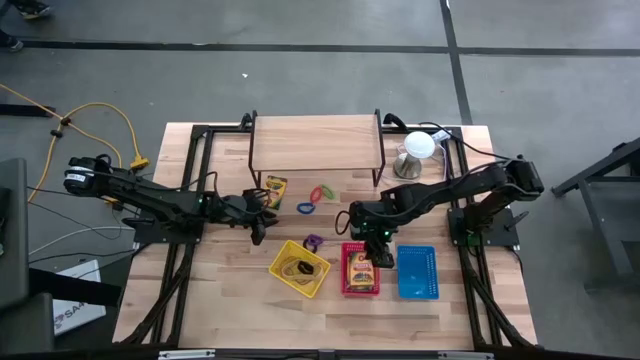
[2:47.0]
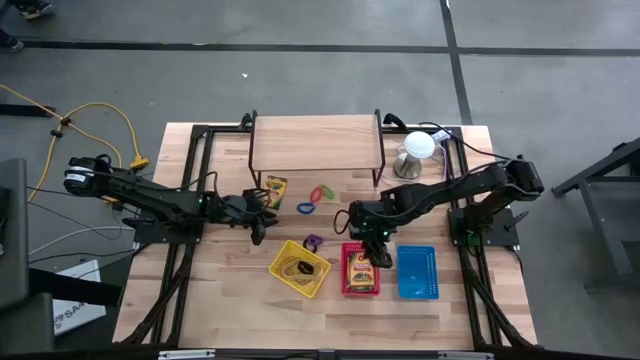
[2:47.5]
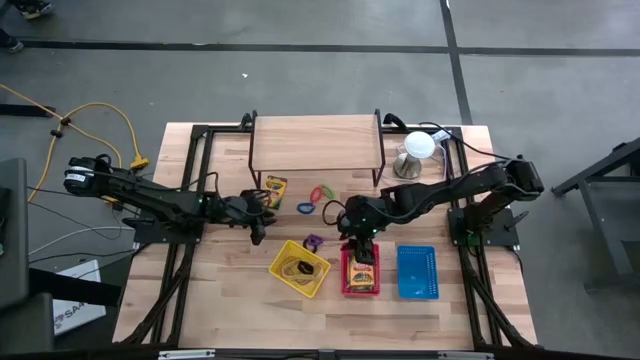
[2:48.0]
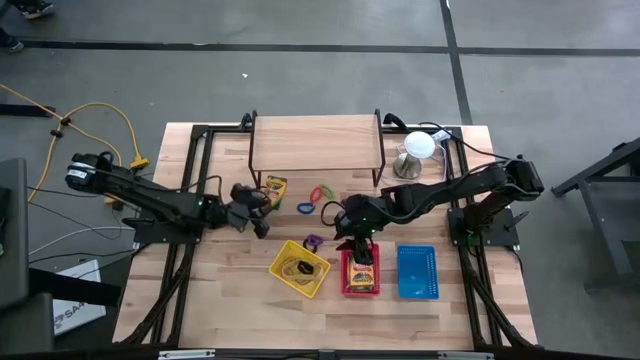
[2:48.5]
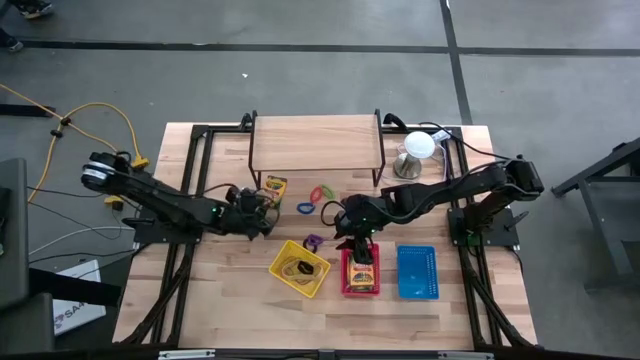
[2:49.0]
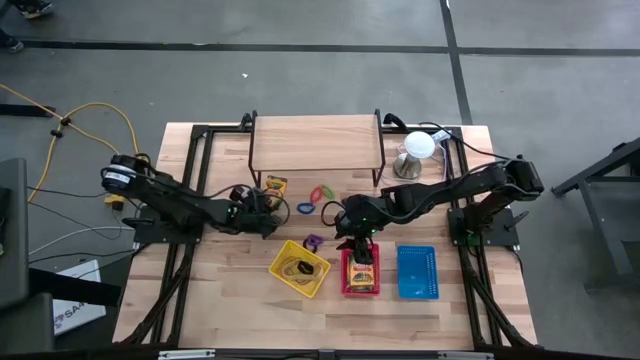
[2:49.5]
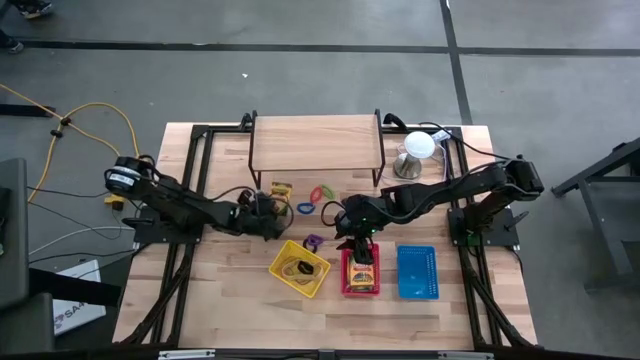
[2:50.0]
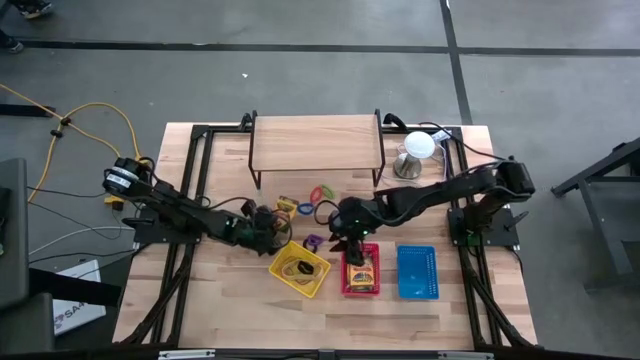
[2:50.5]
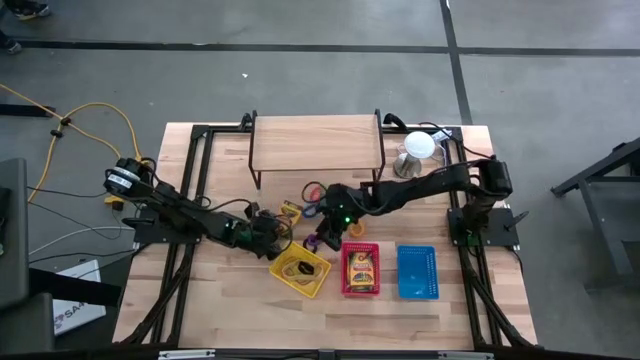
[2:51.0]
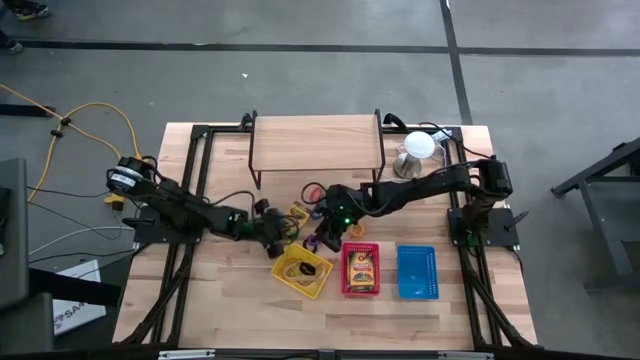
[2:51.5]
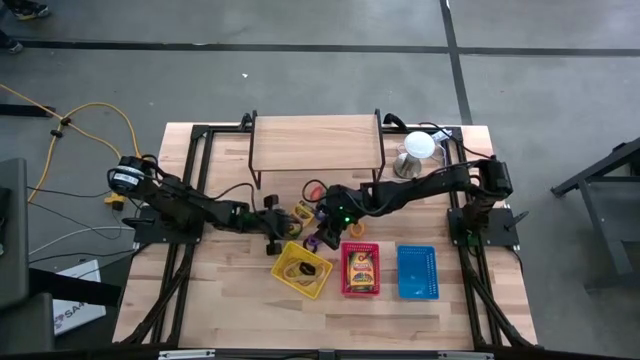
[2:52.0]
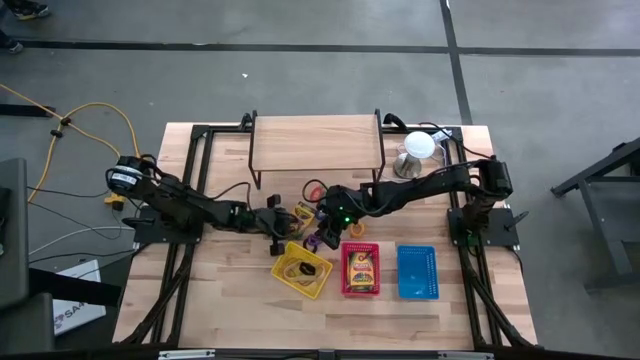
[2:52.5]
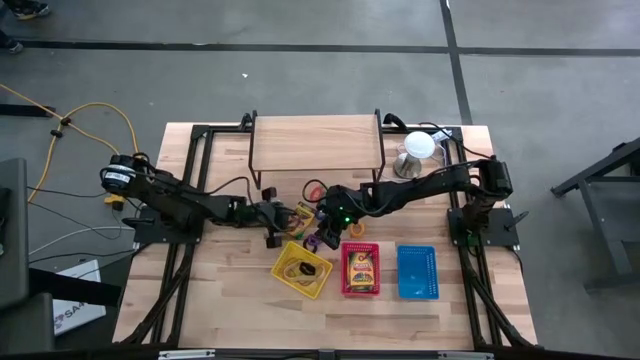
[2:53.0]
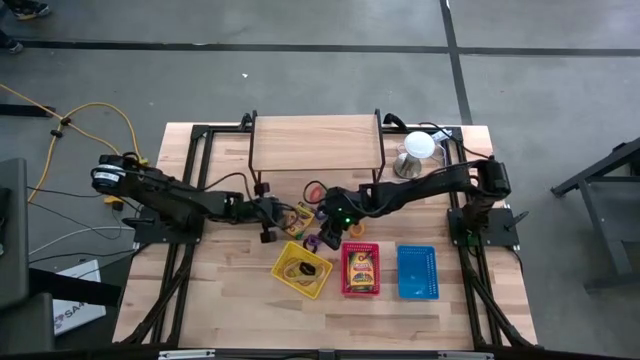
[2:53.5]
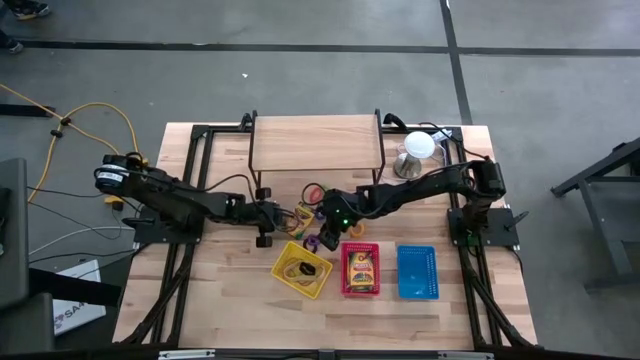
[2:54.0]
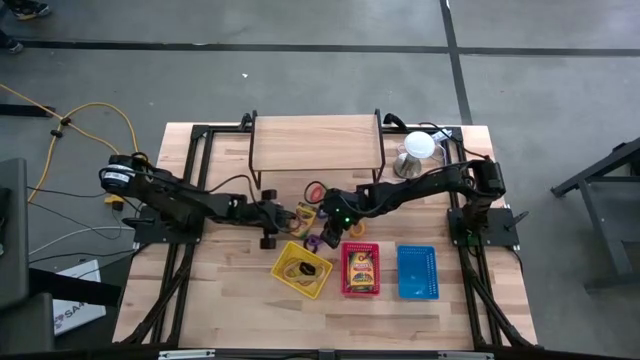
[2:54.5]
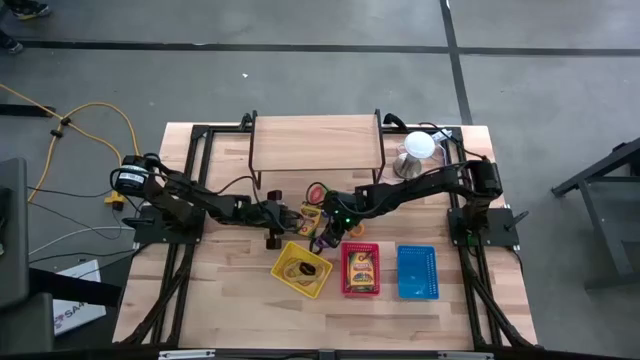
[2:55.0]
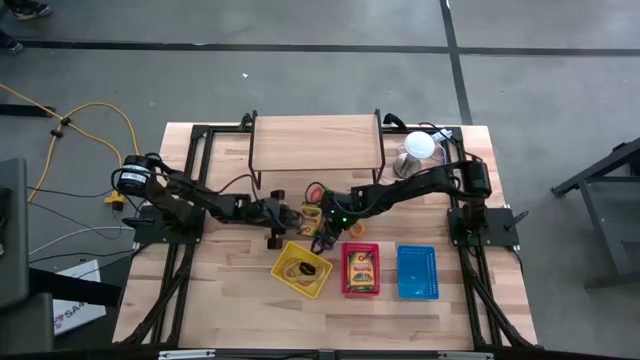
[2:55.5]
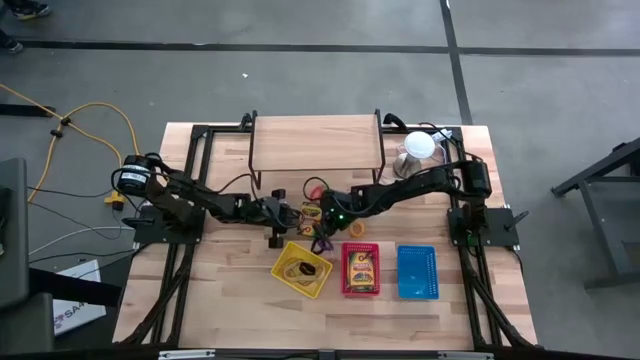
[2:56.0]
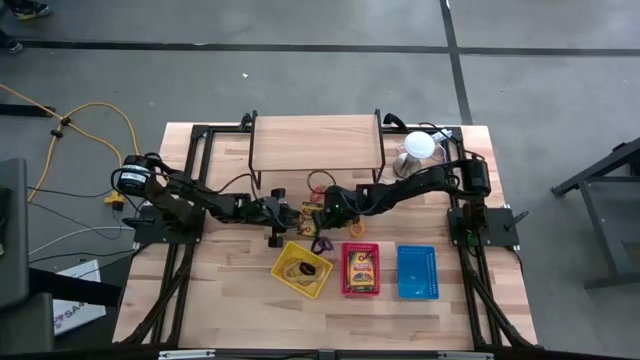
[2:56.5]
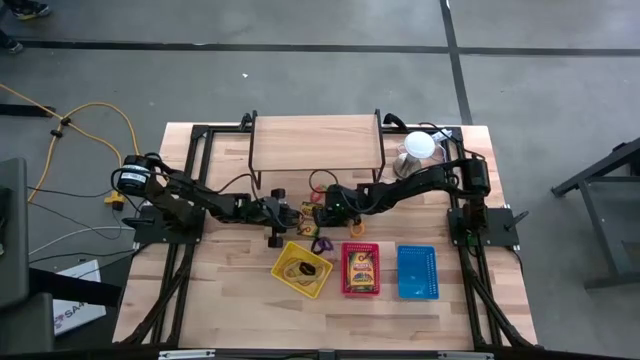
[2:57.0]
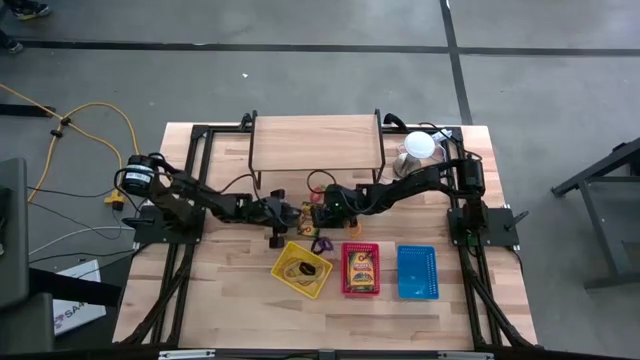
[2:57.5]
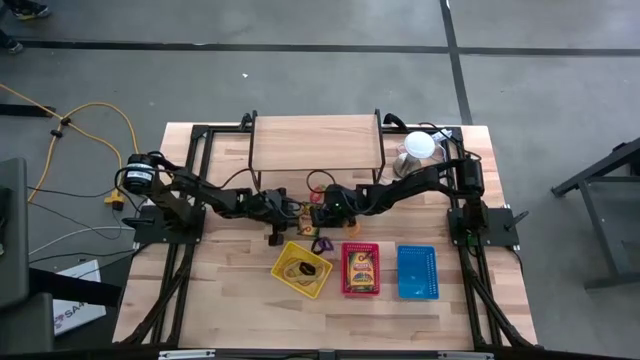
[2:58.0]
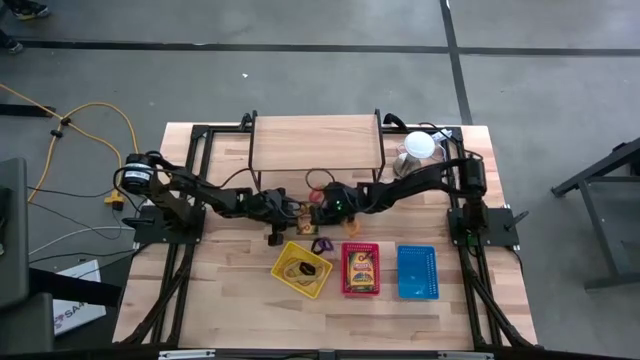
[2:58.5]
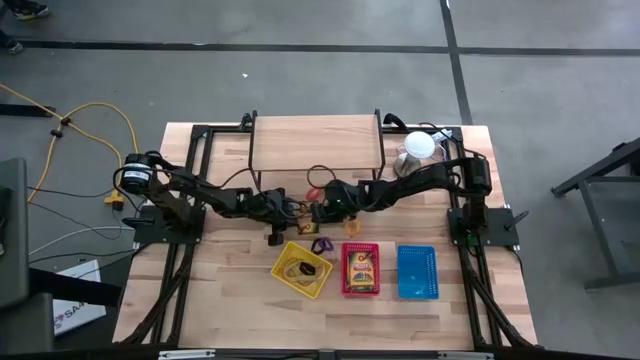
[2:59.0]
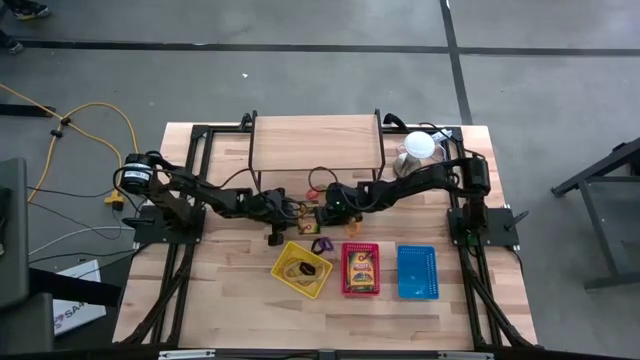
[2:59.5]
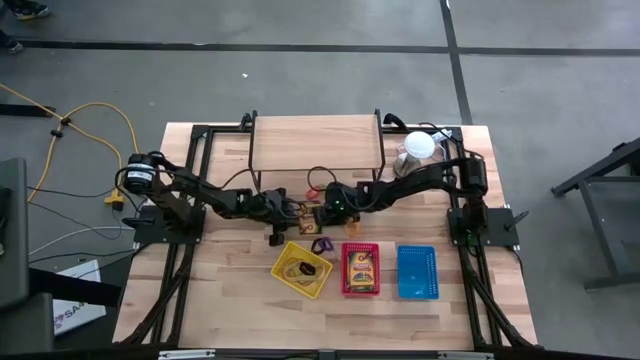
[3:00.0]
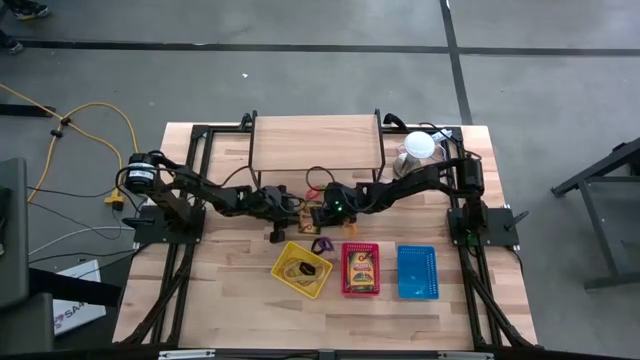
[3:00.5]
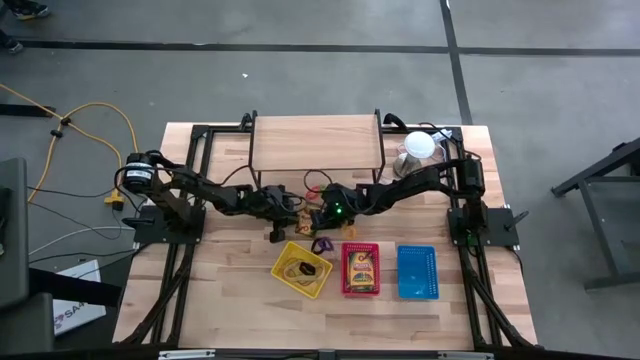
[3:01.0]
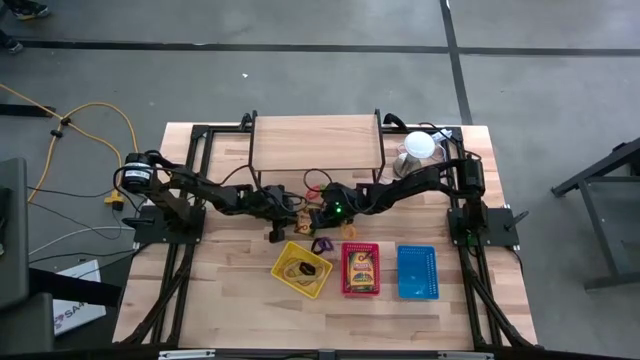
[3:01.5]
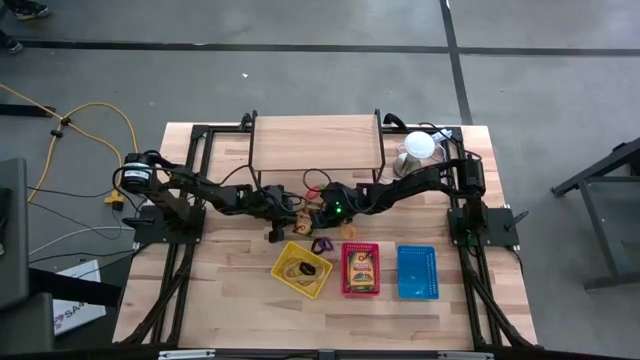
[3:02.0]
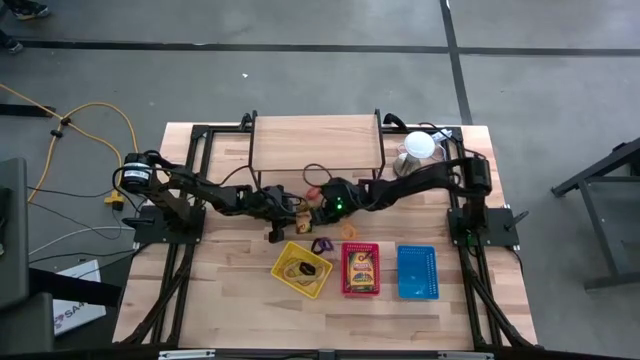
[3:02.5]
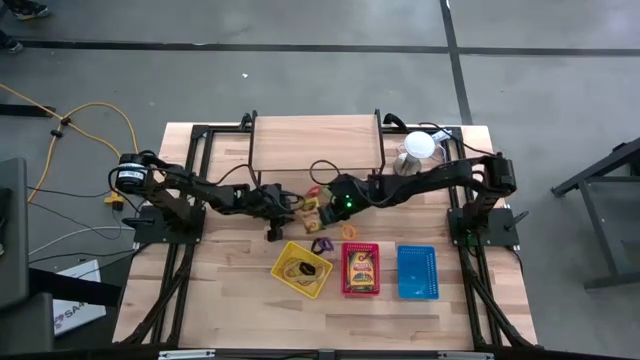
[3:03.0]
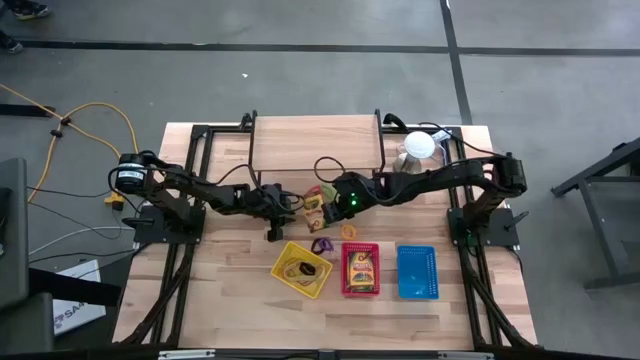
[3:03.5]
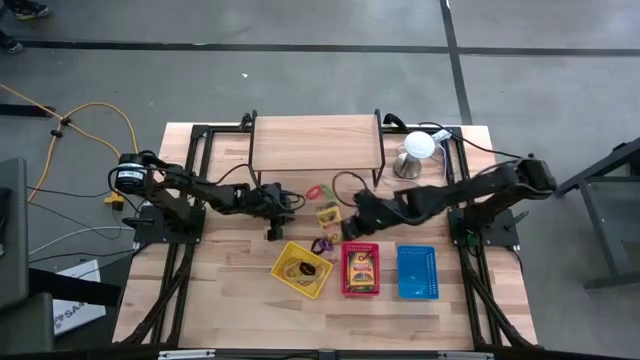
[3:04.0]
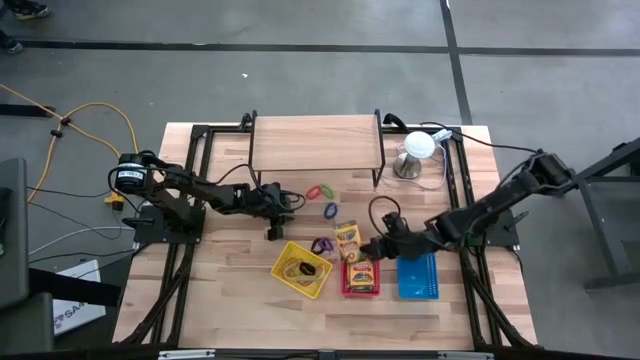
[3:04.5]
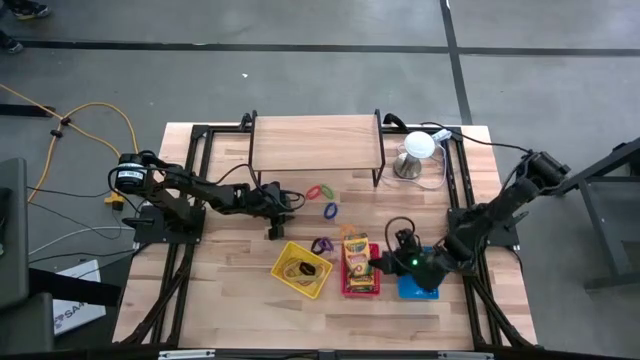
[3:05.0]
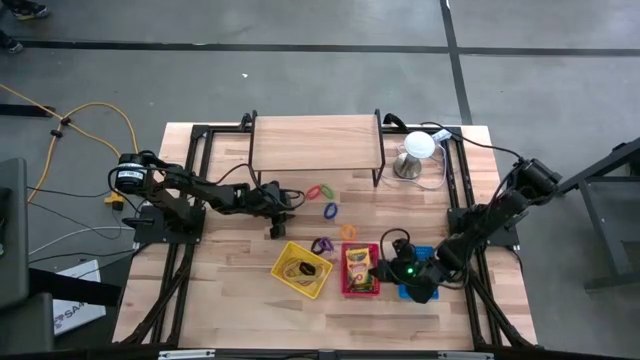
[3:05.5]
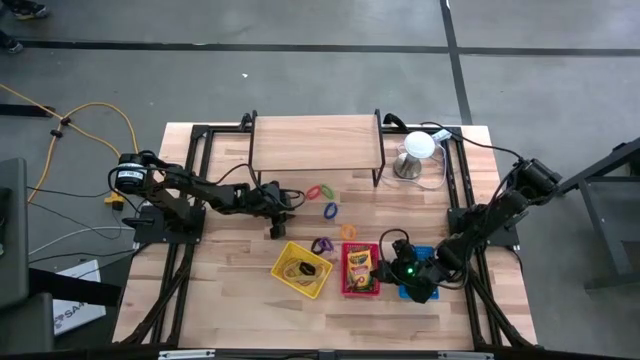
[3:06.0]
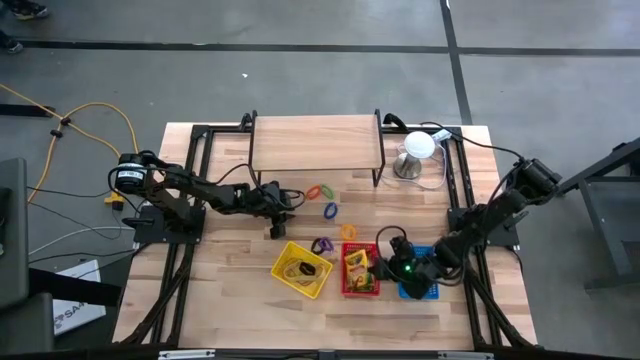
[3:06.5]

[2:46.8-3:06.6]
Task: Pick & Place Office Desk Supplies
Put the crayon box into the red bin
